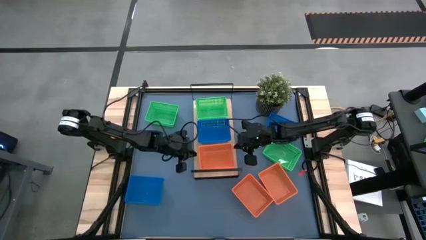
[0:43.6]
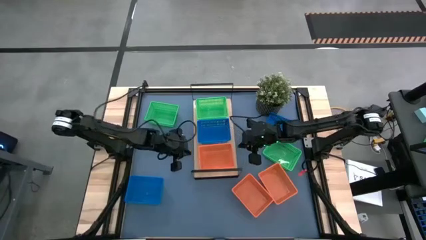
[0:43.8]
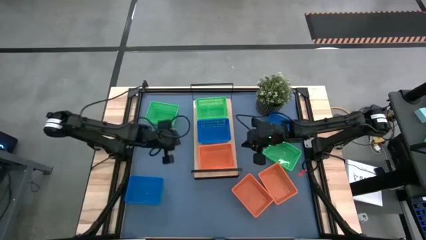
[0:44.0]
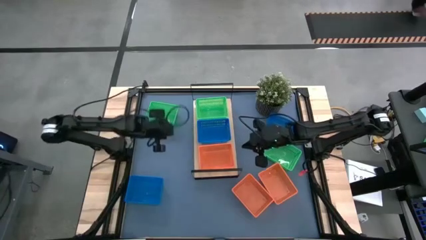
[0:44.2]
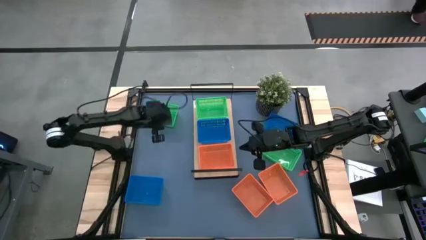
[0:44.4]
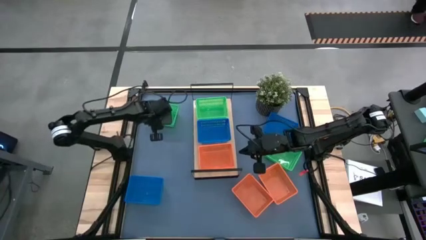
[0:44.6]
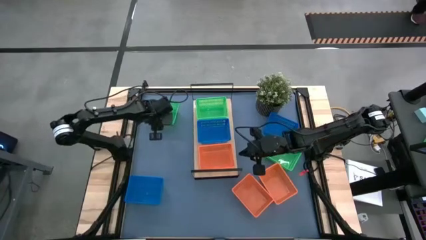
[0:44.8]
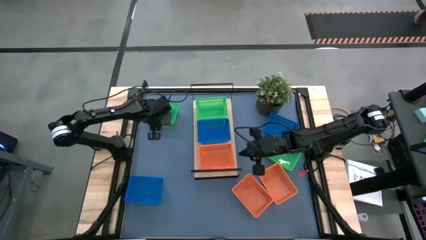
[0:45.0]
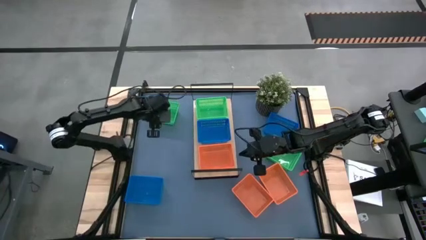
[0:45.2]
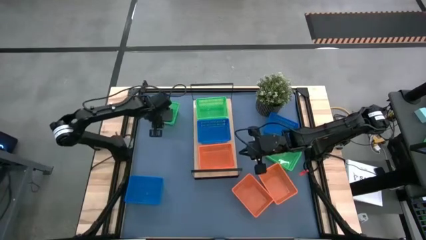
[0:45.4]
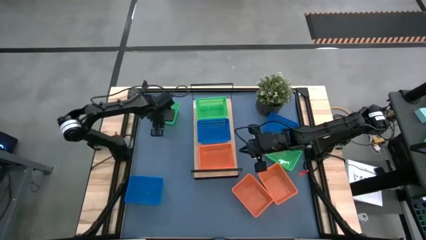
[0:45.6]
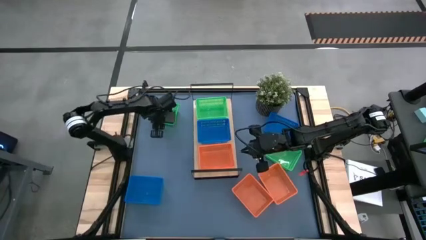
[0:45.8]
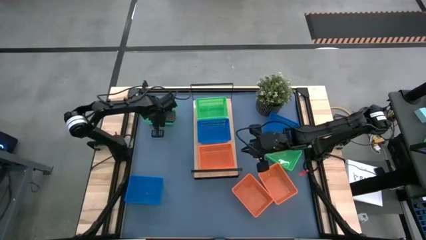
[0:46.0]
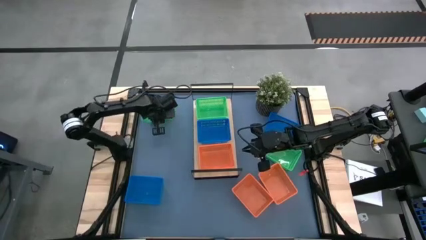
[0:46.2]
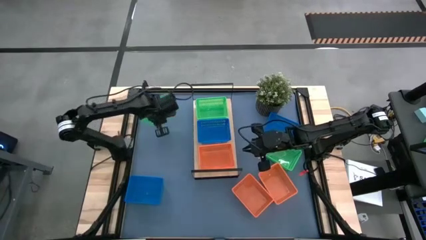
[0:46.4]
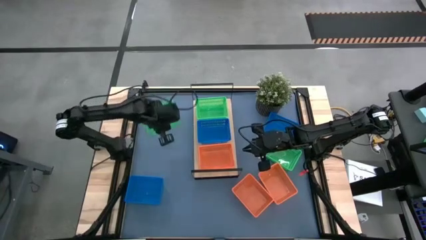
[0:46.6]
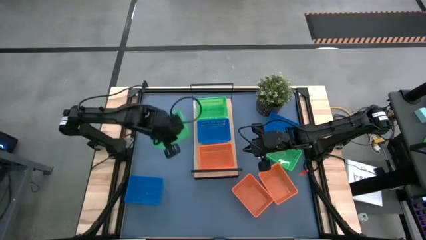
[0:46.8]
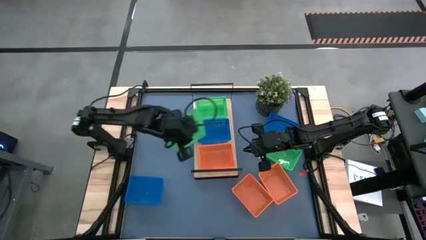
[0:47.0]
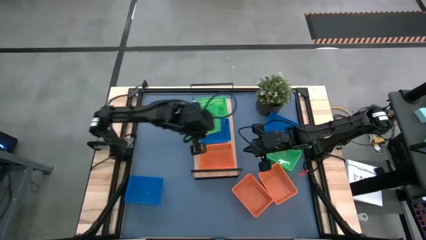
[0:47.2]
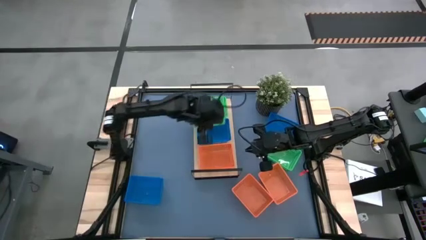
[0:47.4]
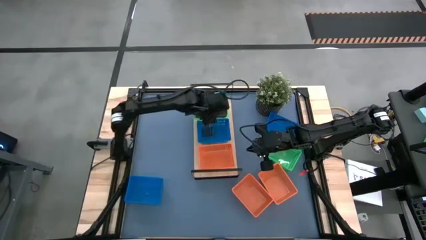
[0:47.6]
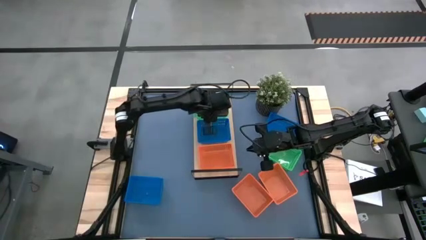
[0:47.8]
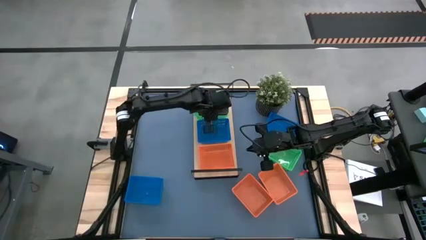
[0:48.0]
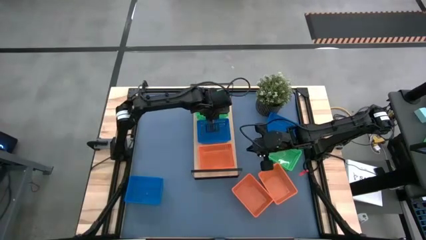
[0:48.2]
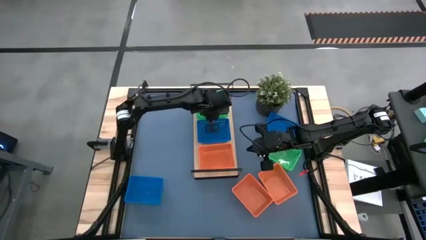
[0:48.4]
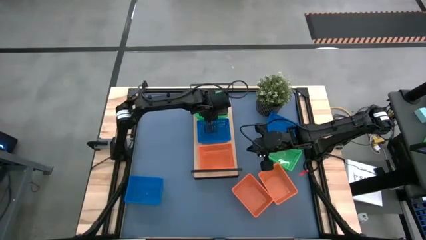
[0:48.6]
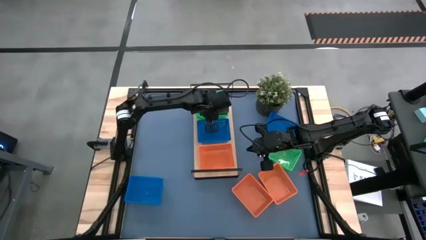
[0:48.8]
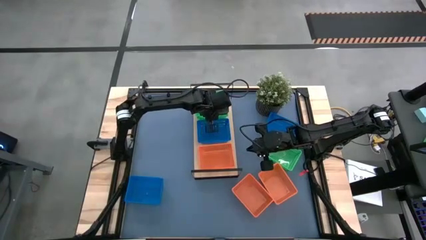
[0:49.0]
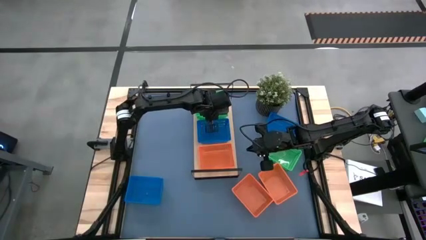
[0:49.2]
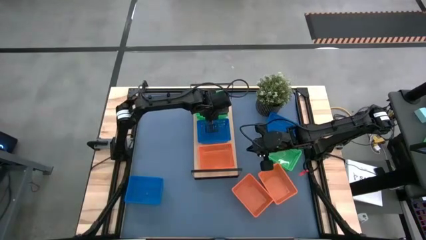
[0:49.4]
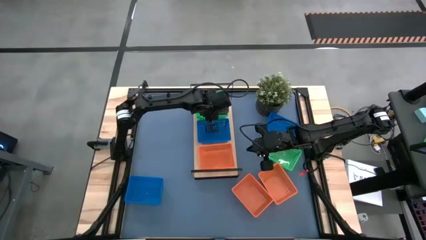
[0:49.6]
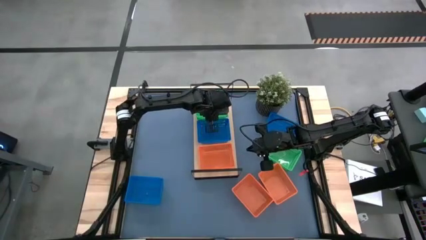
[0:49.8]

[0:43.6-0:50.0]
Task: Stack baskets on shelf by color
Stack the top green bin on top of the green bin on the shelf

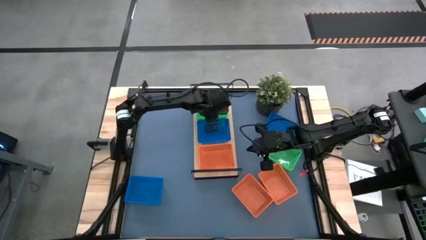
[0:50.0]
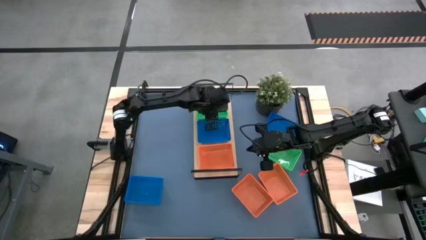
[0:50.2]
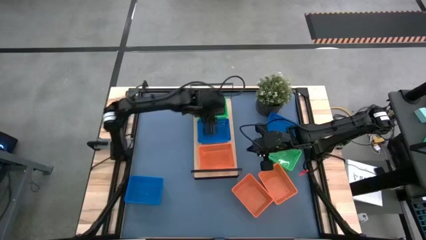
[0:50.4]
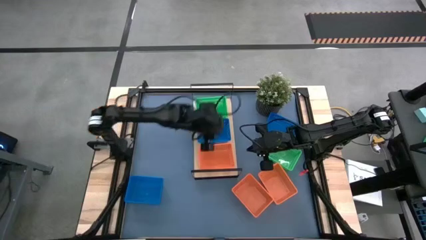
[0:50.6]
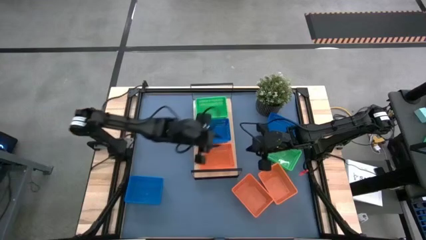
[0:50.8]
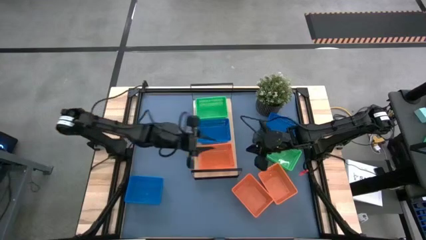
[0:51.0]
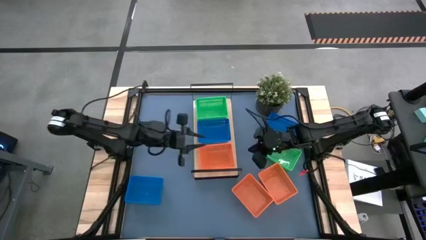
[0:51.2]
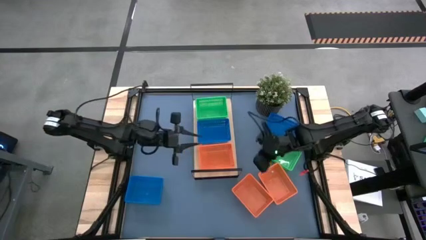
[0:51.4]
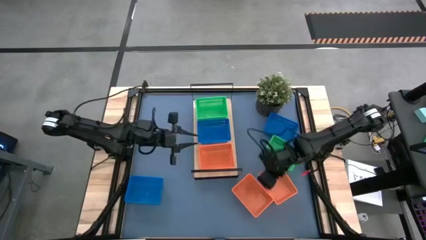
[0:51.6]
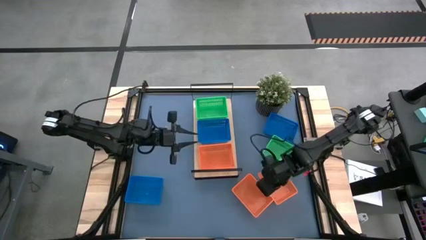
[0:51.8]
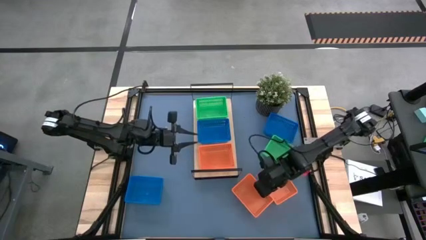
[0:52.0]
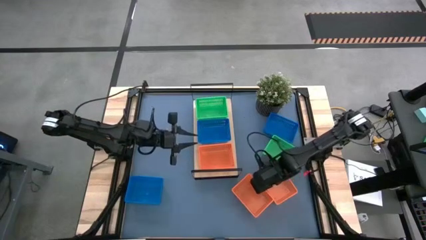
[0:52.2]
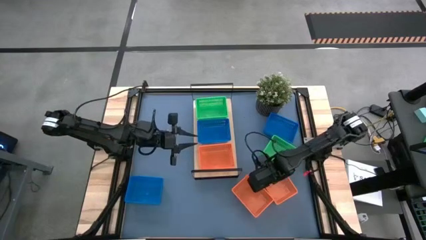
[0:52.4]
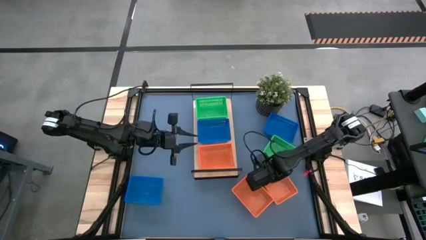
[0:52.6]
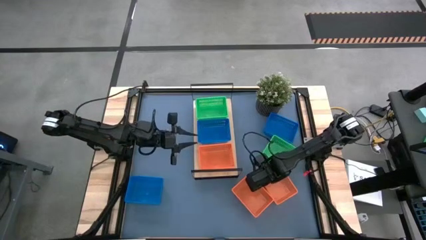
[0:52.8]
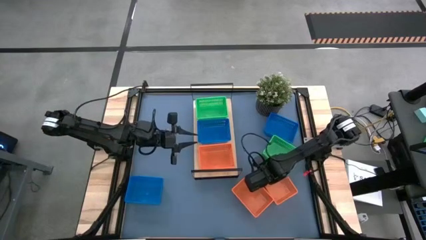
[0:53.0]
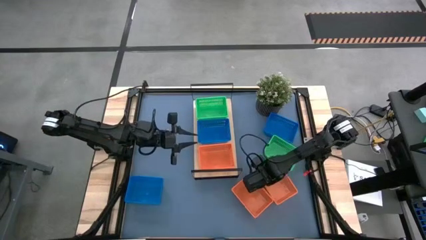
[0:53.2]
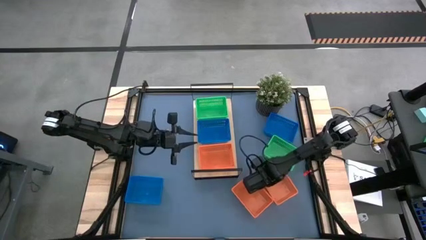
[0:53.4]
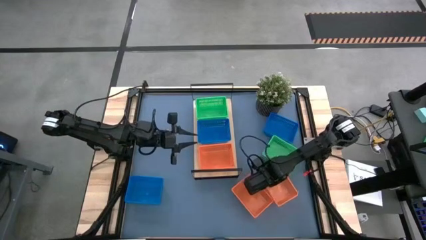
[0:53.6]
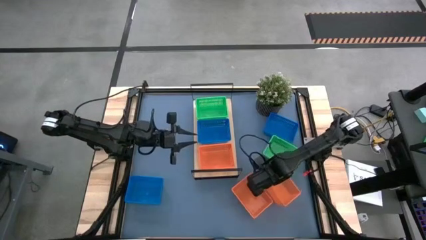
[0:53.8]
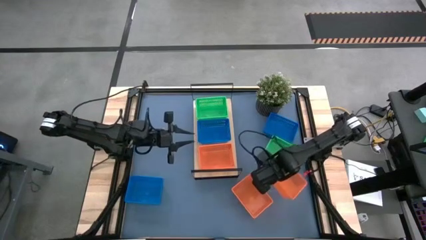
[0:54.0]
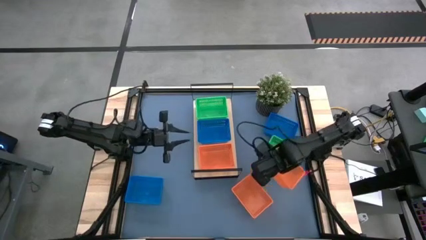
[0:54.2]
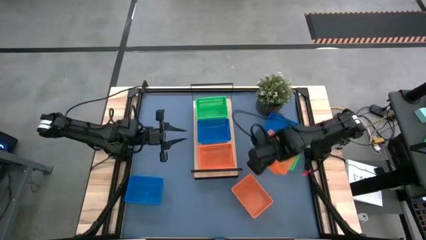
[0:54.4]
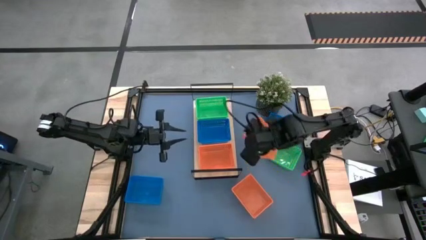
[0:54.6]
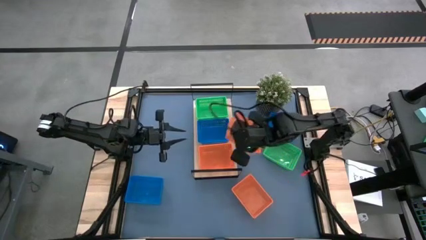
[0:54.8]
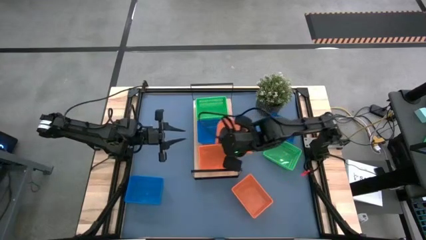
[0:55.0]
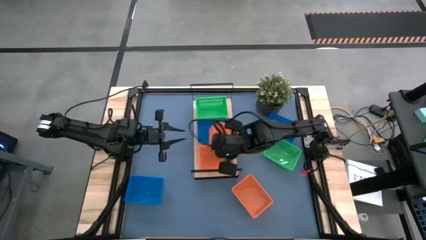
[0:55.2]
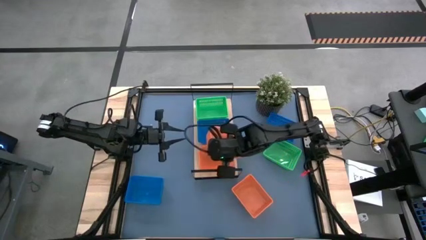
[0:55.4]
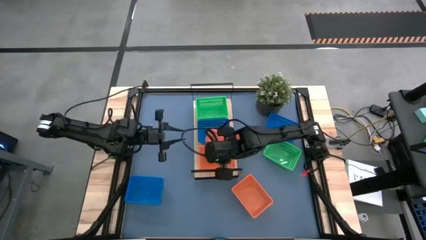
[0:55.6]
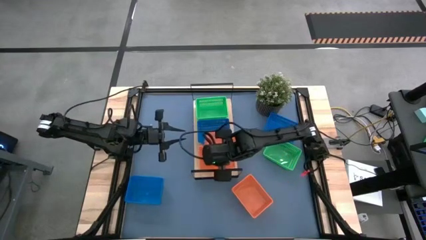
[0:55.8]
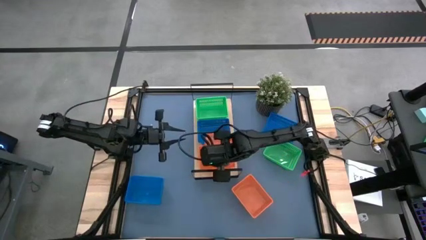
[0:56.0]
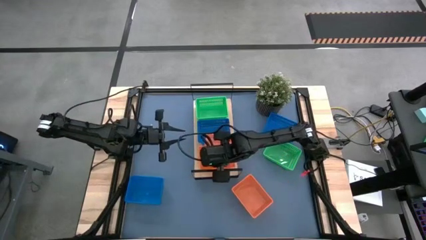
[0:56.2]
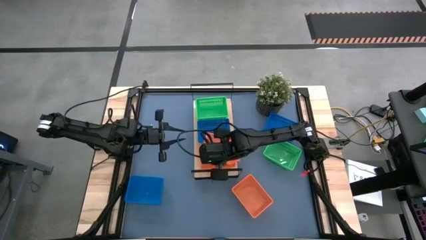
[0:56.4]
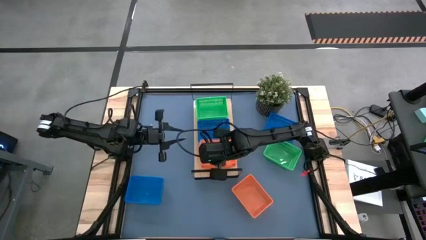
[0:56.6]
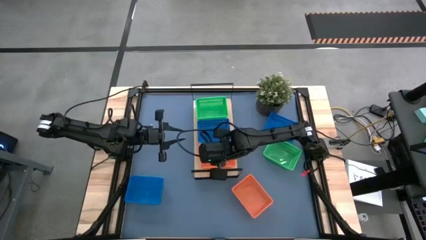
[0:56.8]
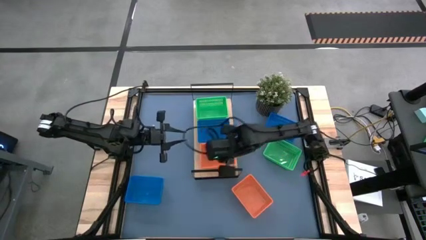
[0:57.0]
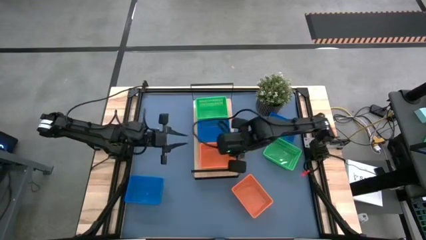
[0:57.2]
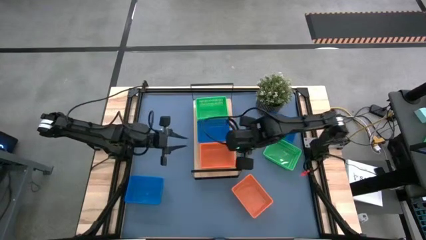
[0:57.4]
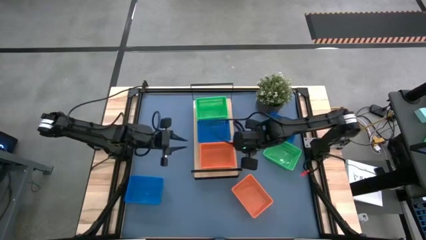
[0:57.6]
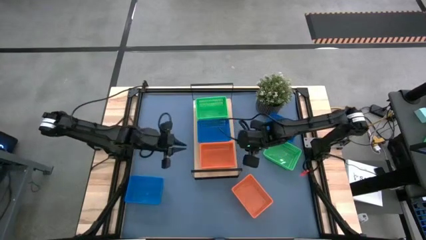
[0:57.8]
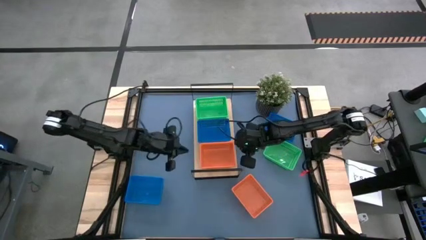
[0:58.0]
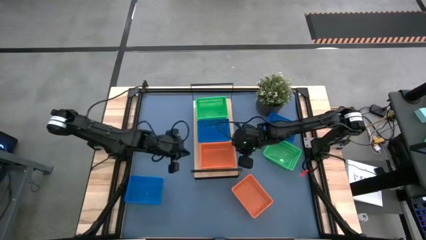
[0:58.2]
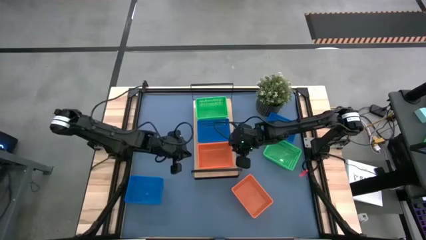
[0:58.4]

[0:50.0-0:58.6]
Stack the right orange bin on top of the orange bin on the shelf
